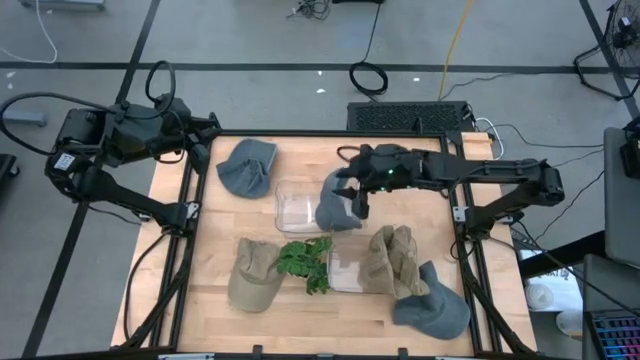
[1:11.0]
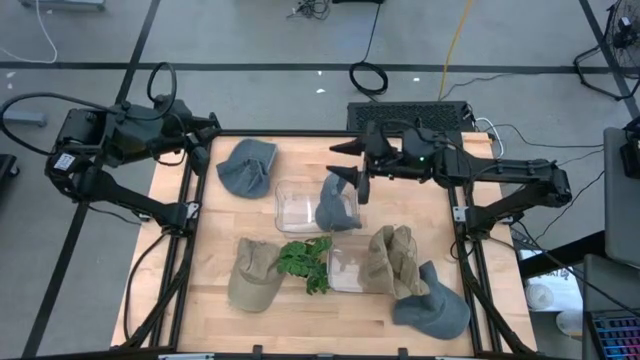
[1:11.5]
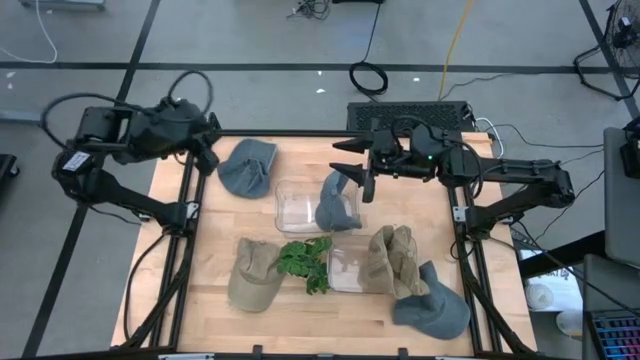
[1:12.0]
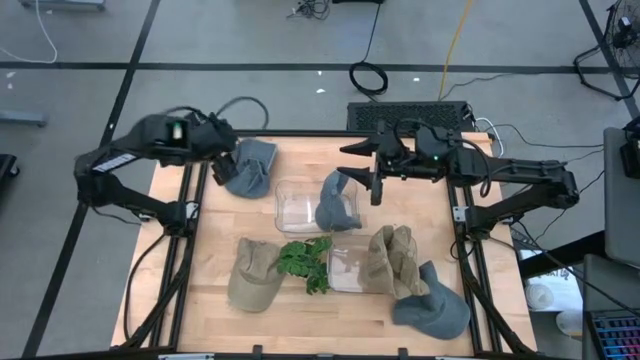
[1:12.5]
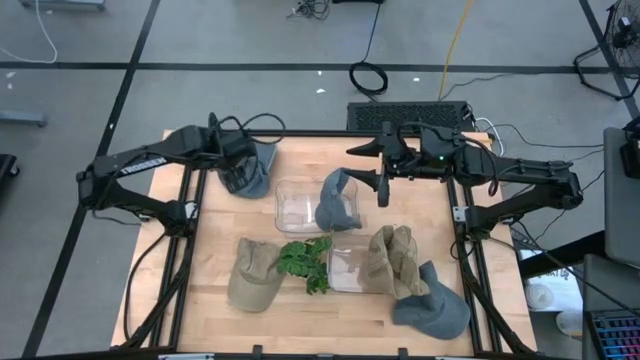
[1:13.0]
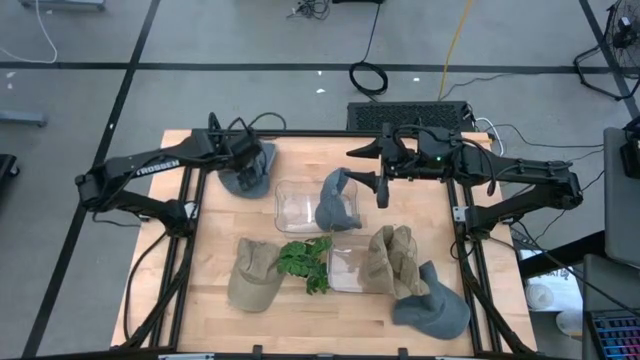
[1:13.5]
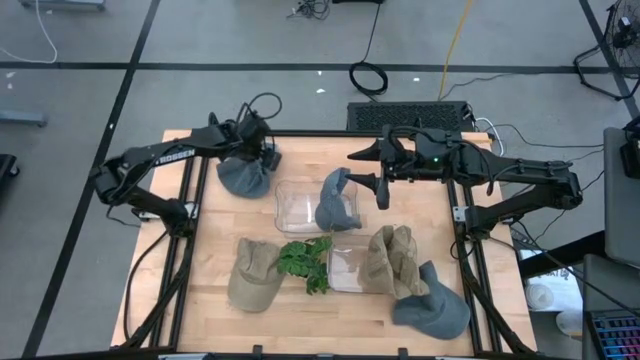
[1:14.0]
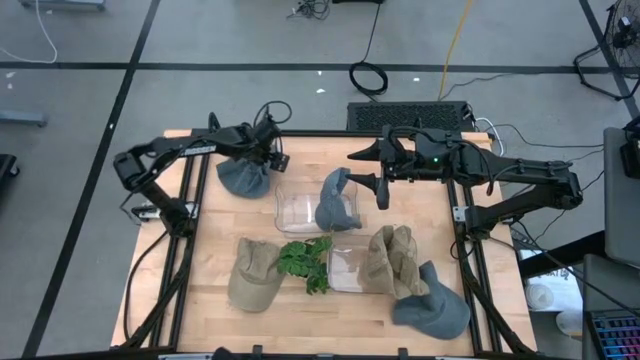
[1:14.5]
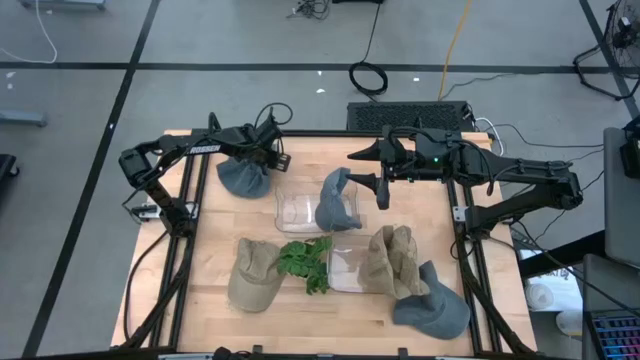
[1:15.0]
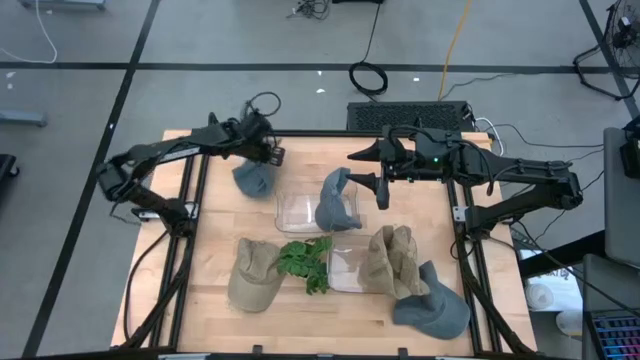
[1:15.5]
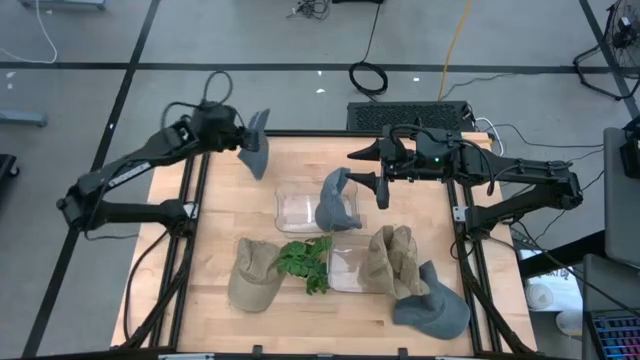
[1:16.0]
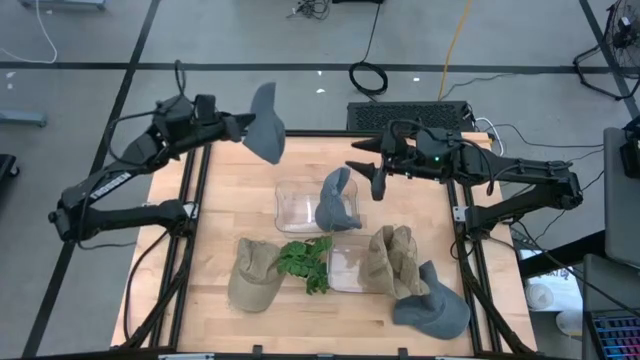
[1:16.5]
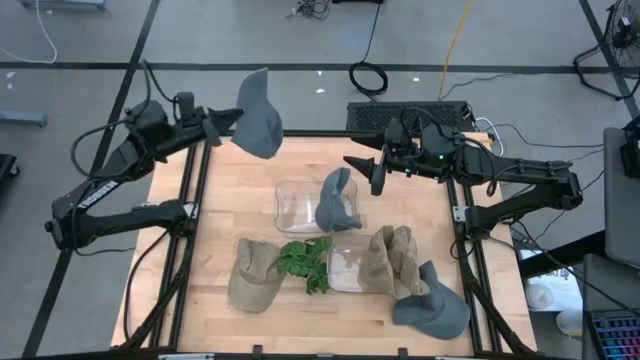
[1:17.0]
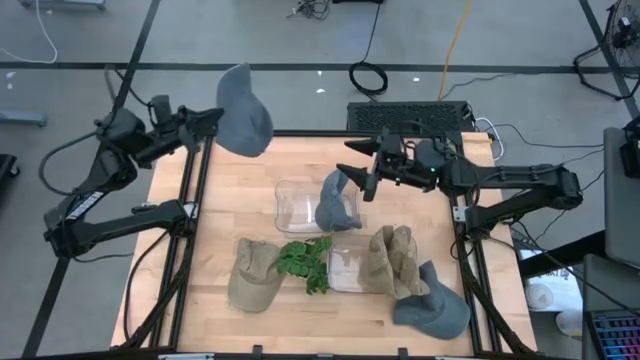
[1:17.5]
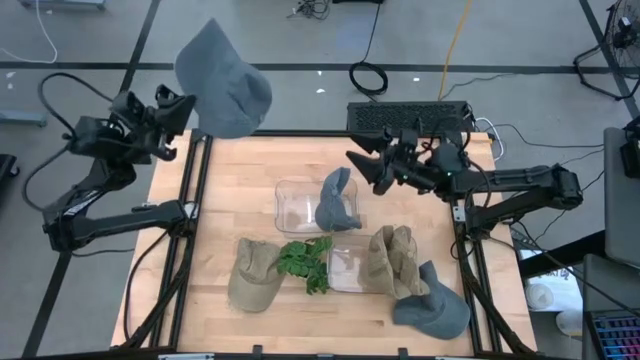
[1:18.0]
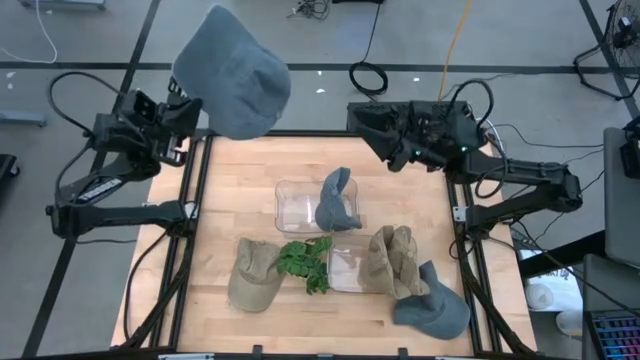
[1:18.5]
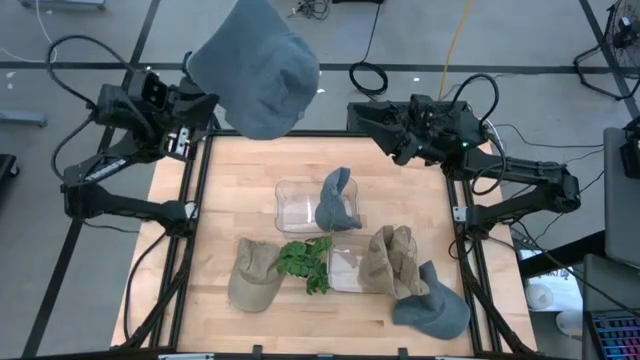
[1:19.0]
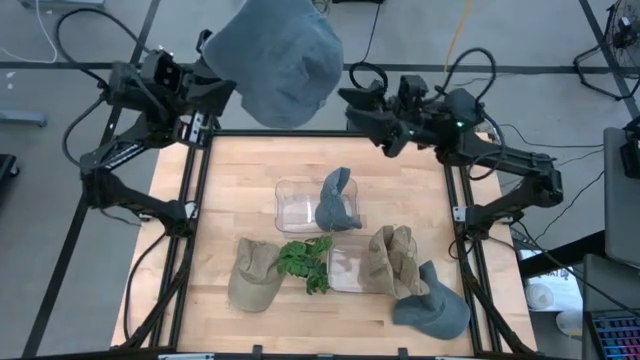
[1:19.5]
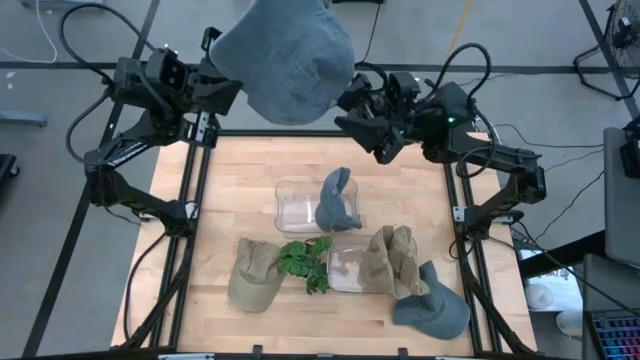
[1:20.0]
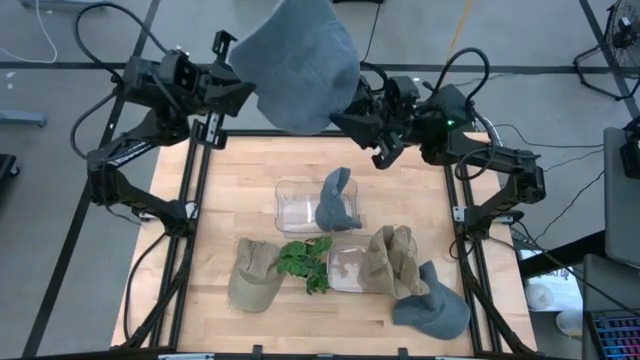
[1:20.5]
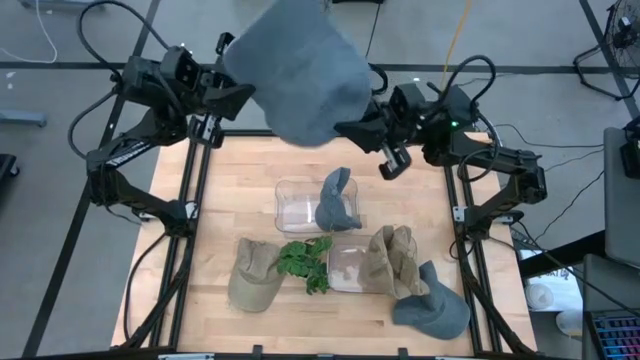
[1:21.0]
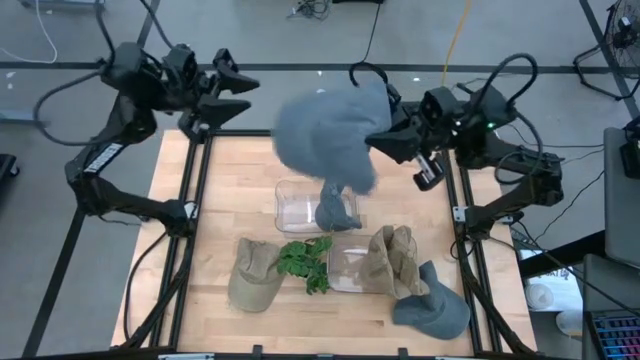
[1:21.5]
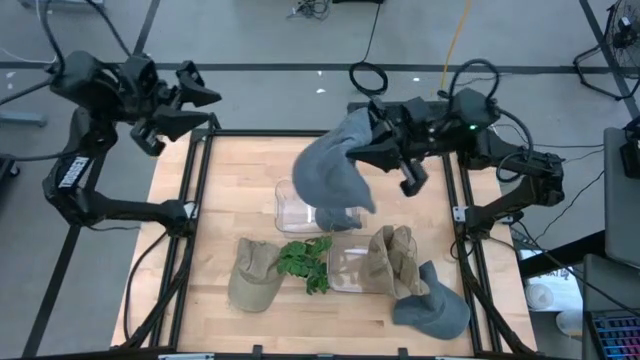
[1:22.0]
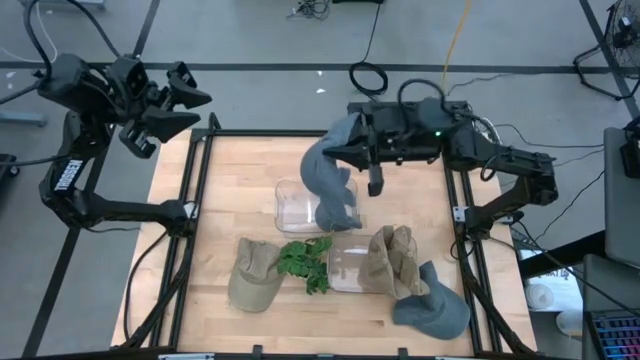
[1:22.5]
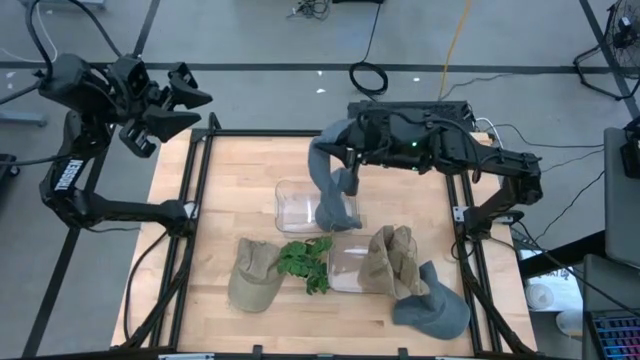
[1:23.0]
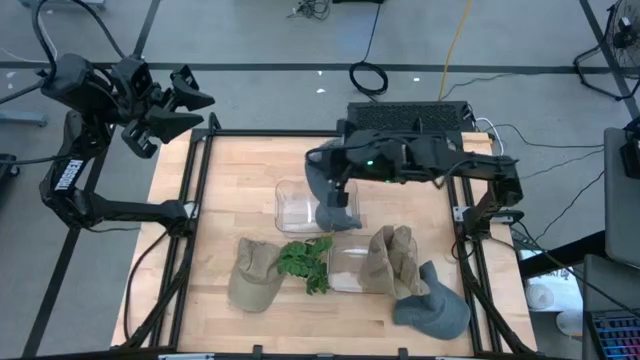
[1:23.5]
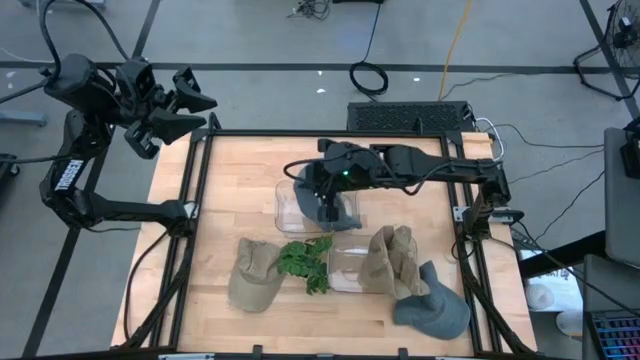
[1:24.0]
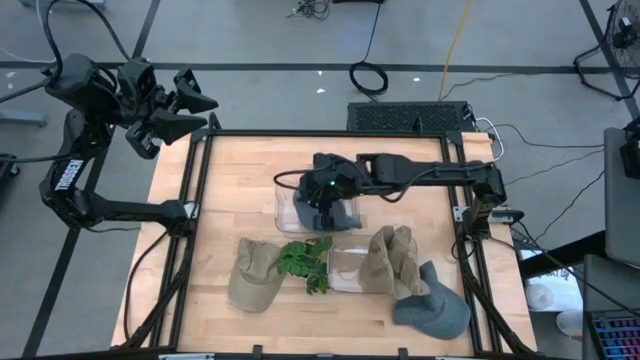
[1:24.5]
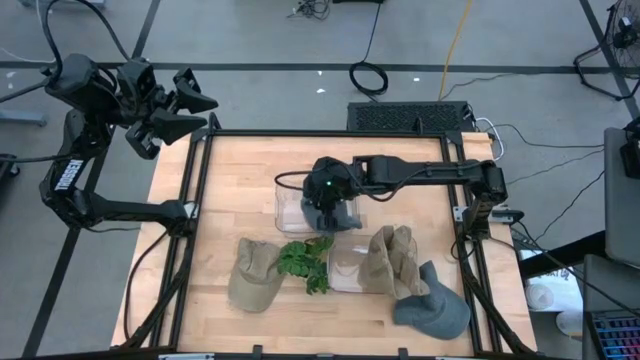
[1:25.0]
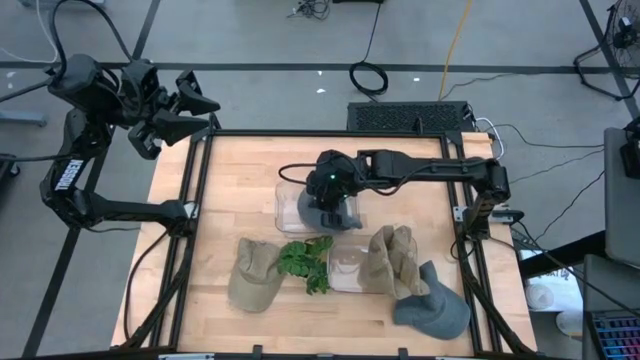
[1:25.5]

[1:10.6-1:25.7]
Task: Pick & Place hat
Put the top gray cap into the top transparent bin

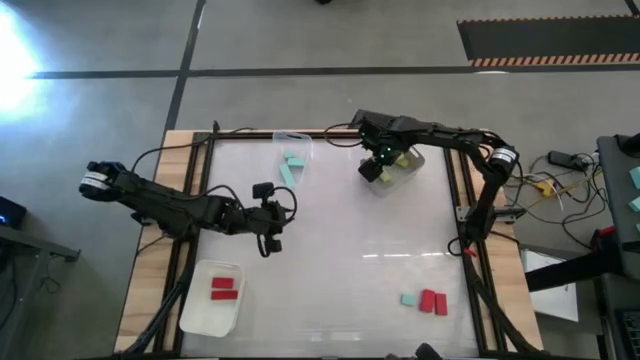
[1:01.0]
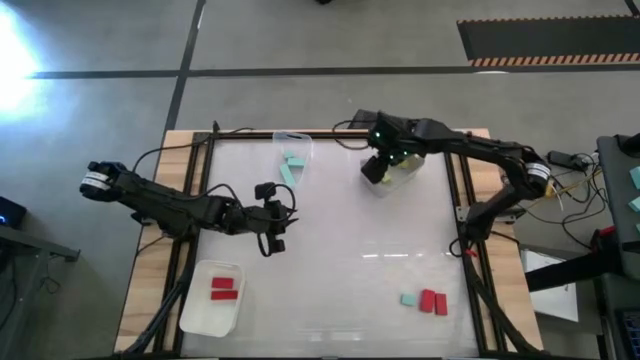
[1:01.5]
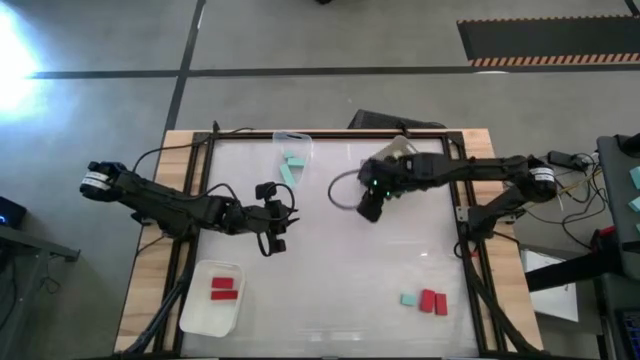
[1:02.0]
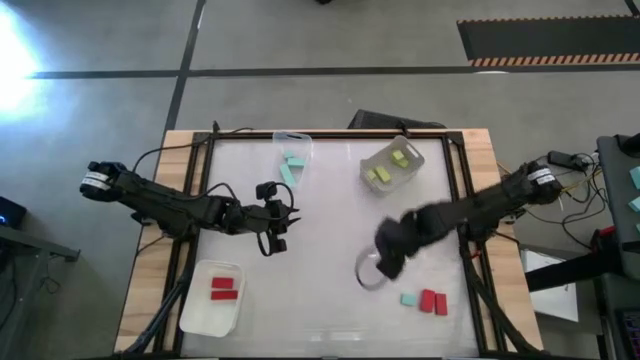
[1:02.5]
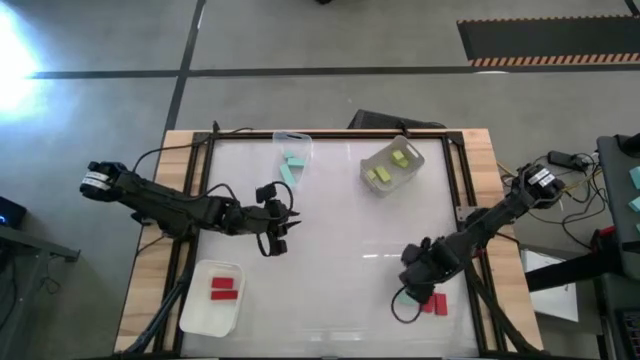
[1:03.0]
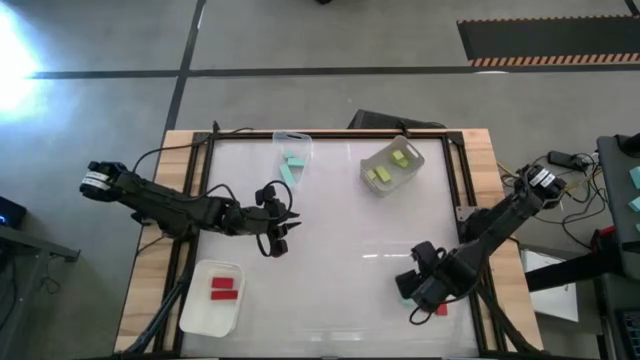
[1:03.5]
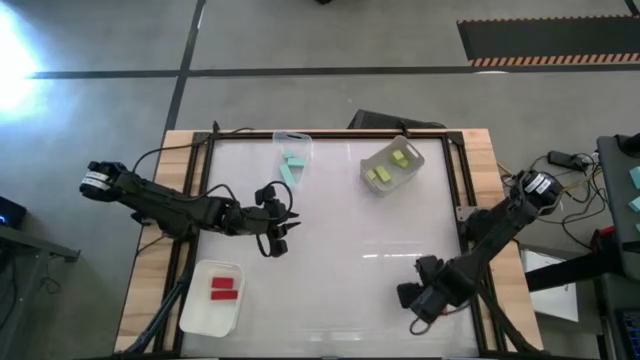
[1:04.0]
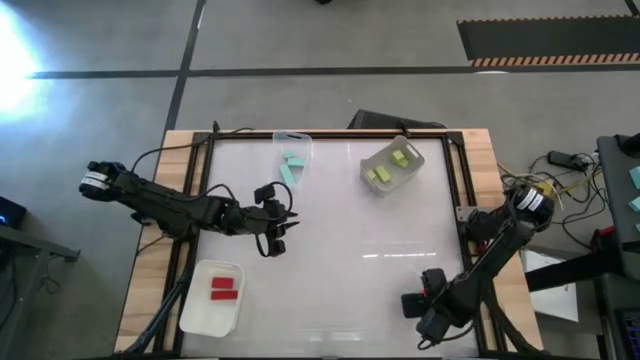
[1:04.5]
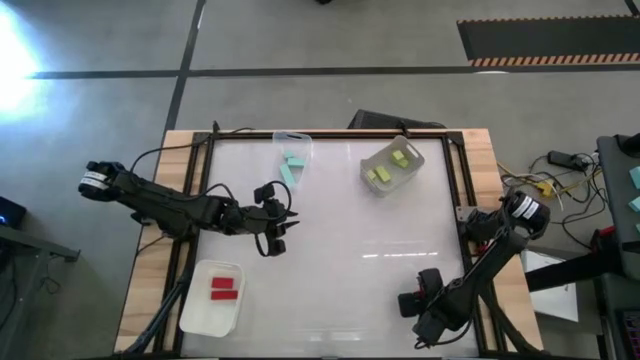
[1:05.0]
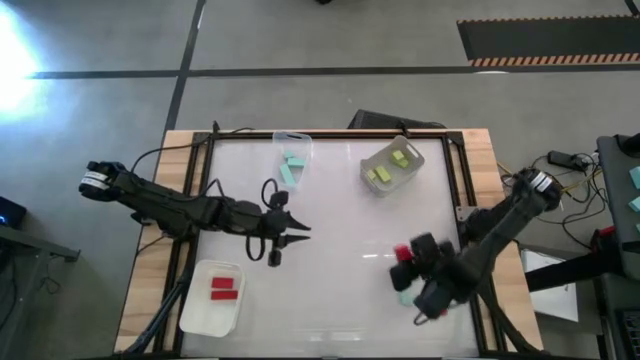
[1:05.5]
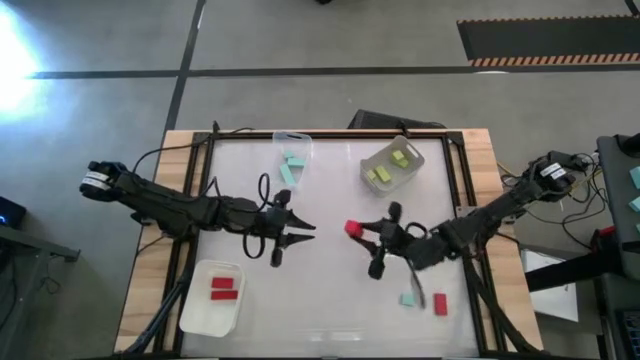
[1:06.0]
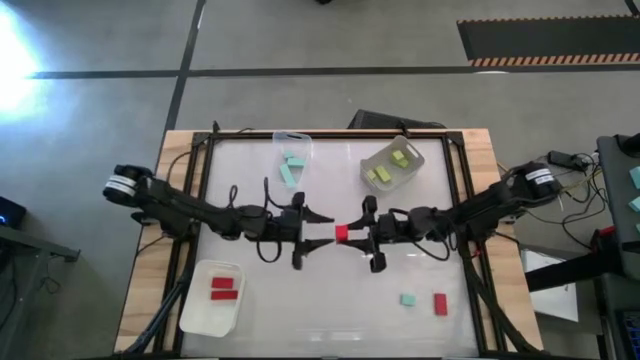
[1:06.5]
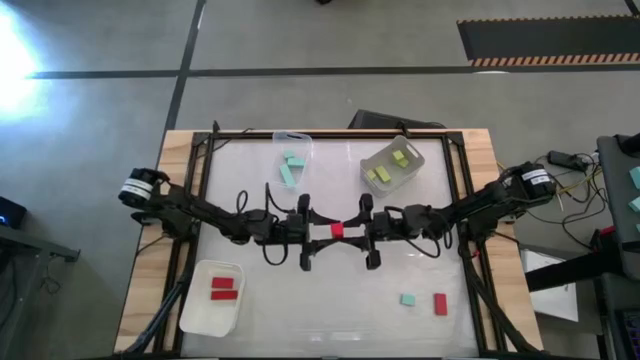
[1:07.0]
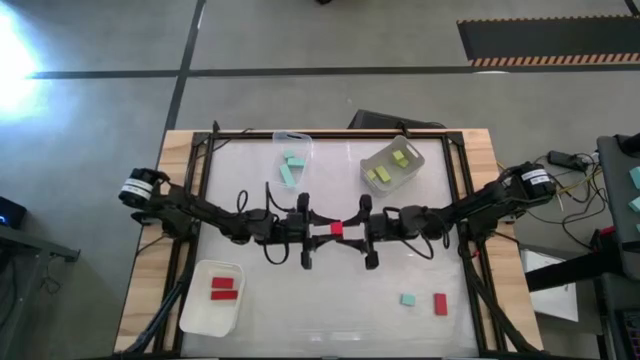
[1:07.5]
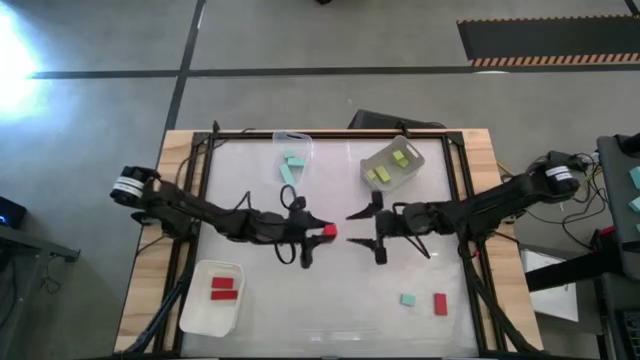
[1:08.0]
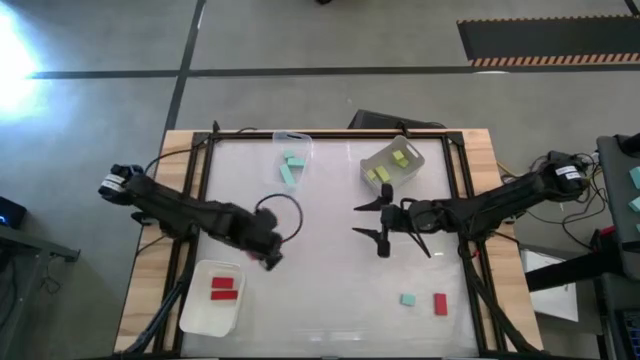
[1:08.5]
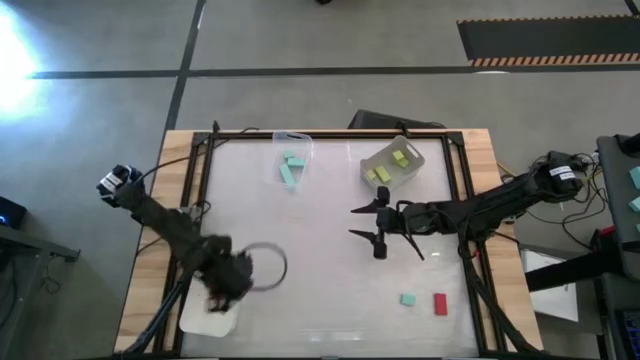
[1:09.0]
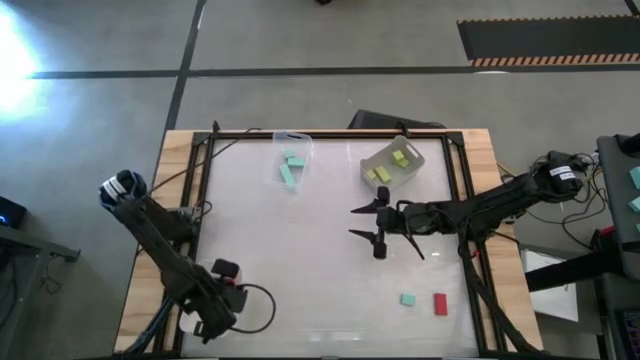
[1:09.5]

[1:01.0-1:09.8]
Task: Sort & place blocks by color
Put the red block into the white bin
